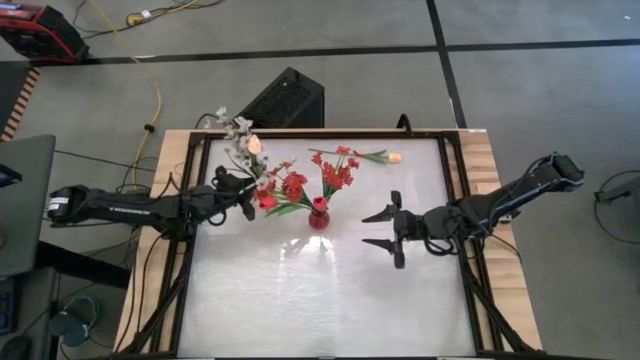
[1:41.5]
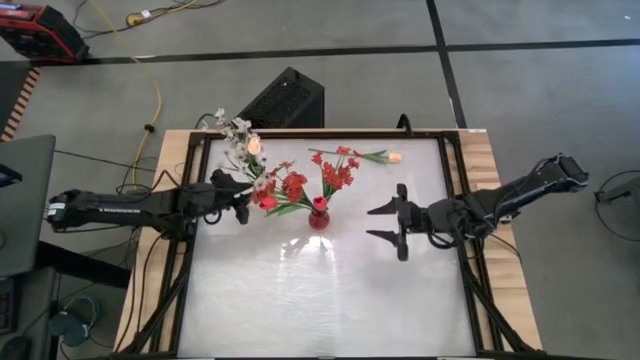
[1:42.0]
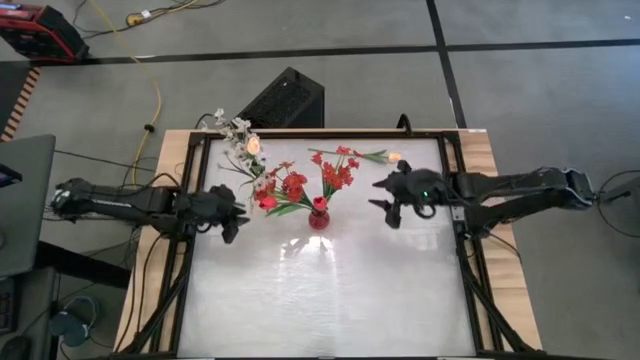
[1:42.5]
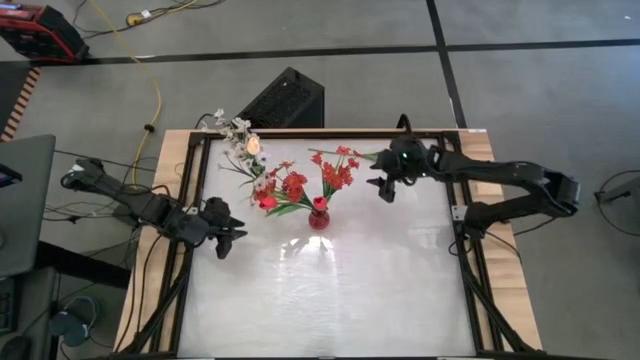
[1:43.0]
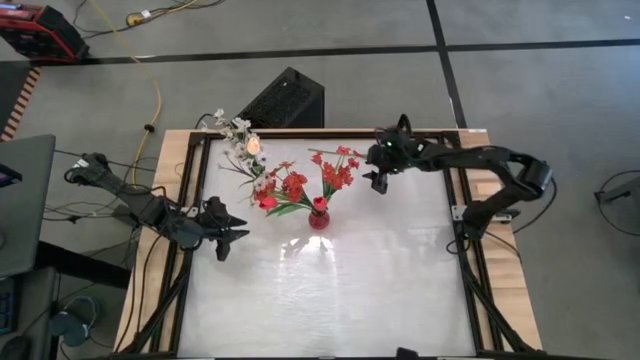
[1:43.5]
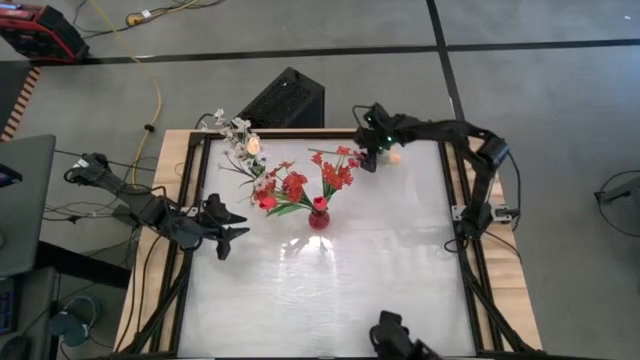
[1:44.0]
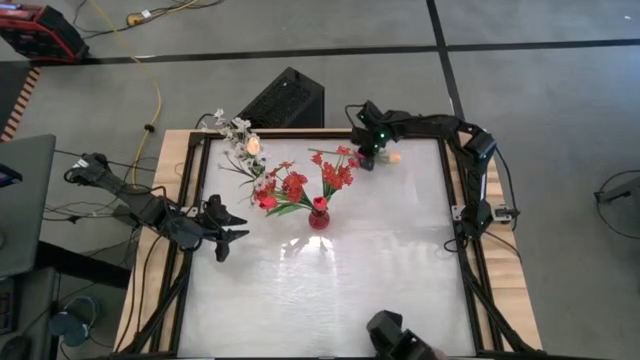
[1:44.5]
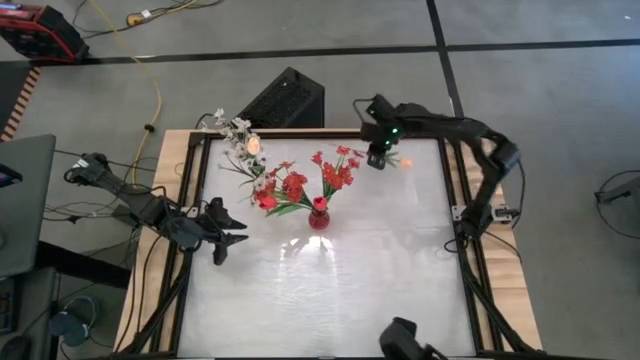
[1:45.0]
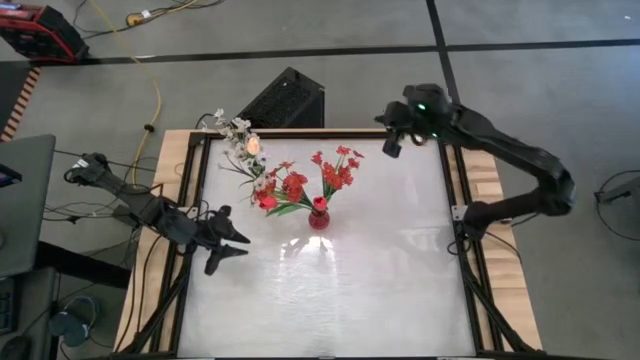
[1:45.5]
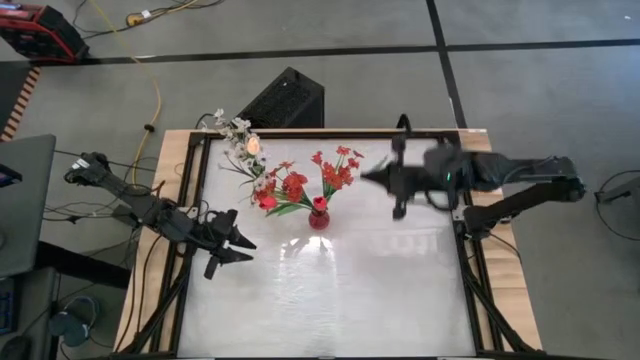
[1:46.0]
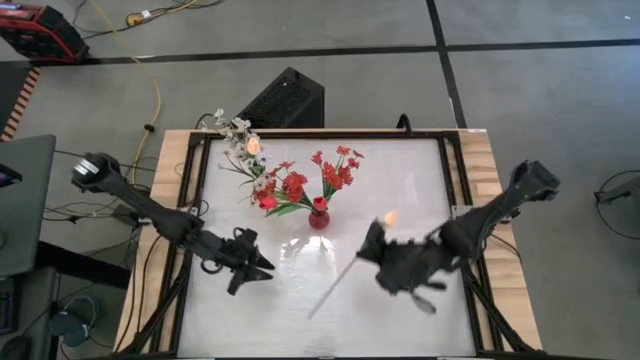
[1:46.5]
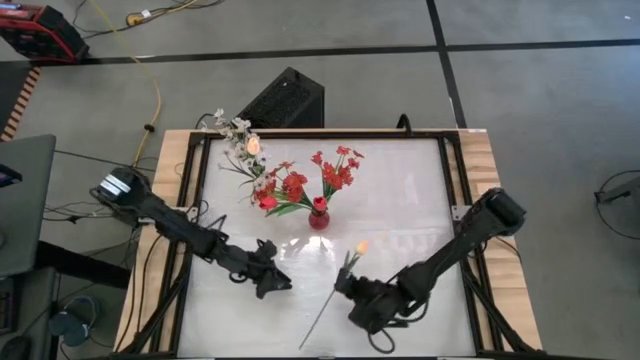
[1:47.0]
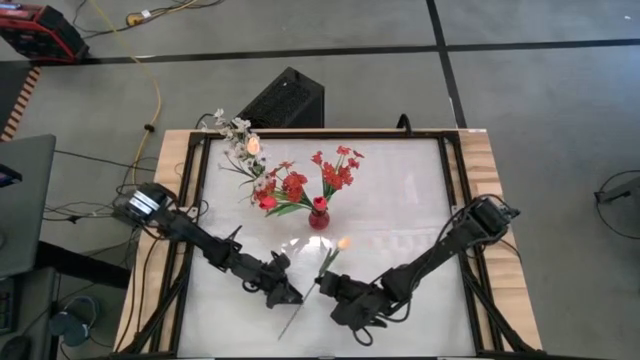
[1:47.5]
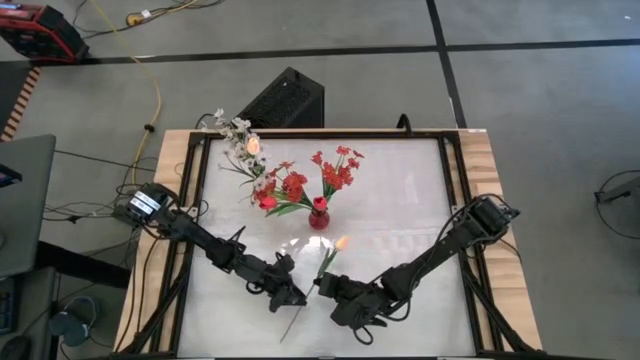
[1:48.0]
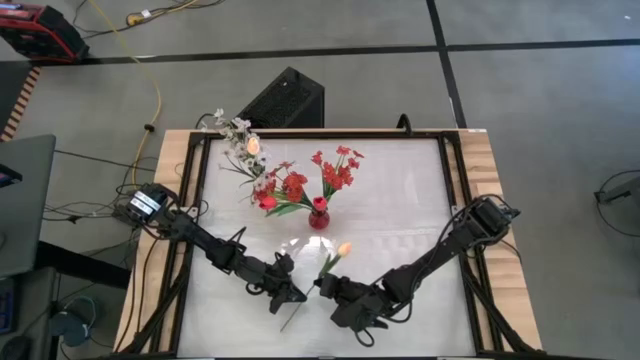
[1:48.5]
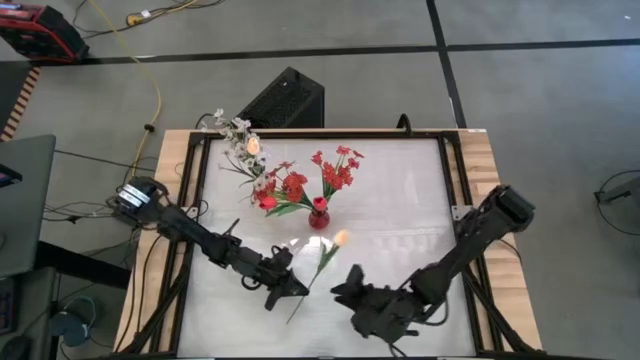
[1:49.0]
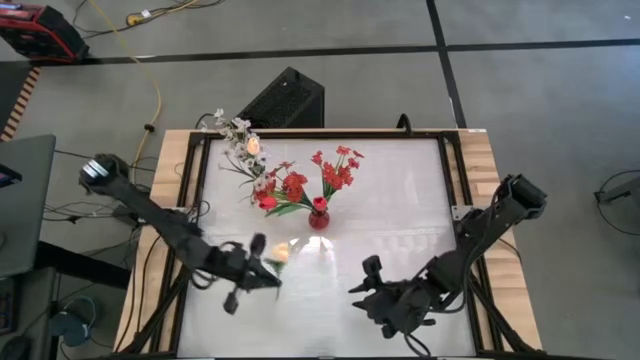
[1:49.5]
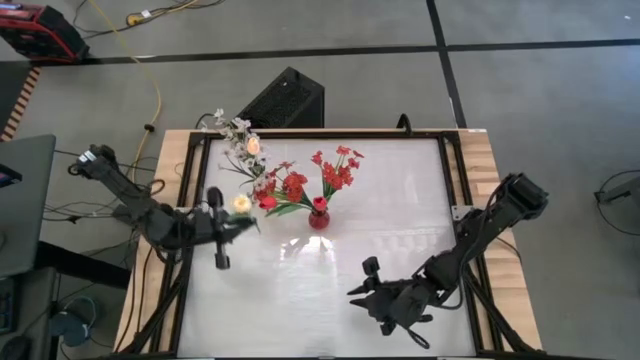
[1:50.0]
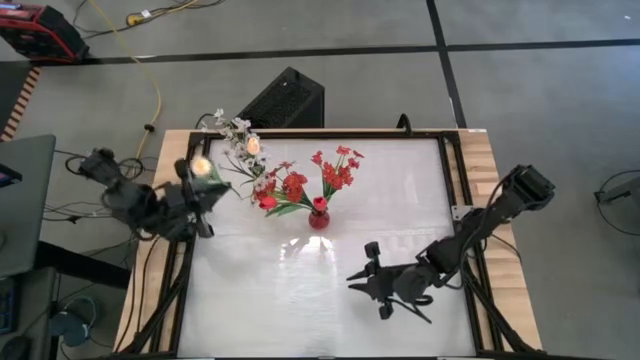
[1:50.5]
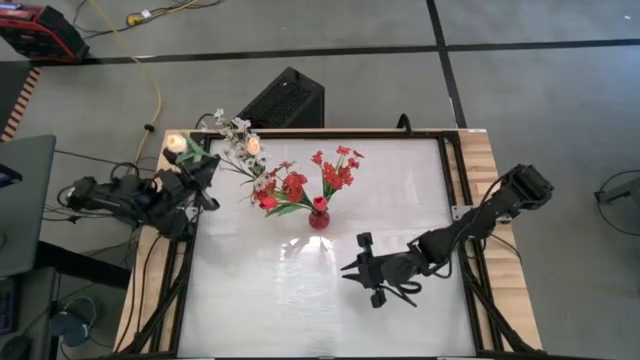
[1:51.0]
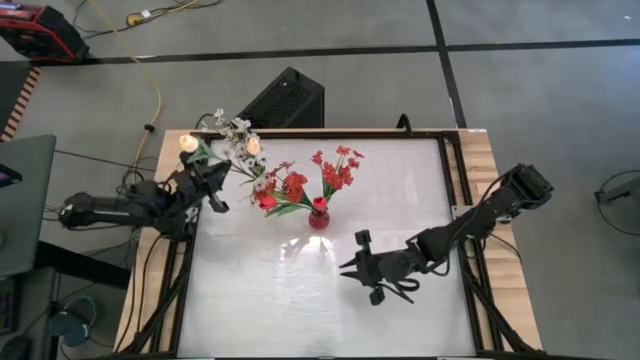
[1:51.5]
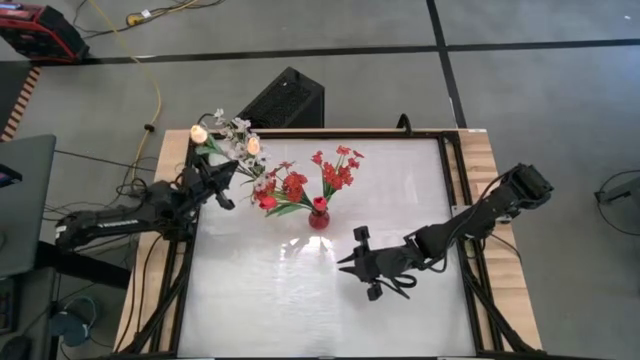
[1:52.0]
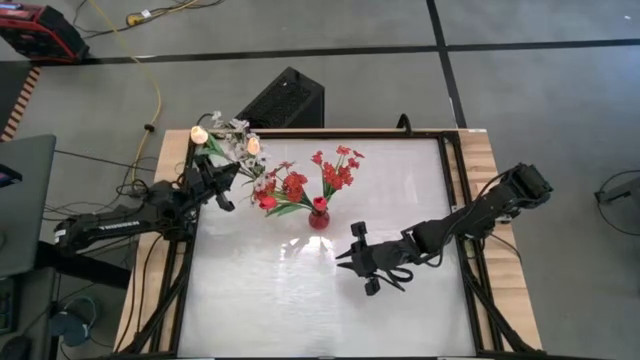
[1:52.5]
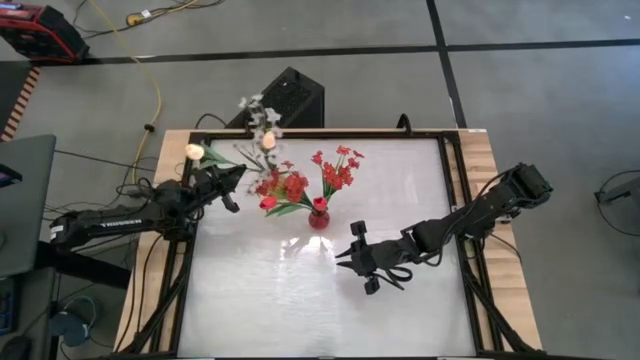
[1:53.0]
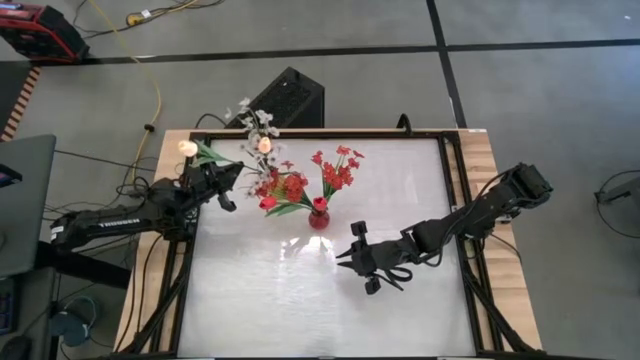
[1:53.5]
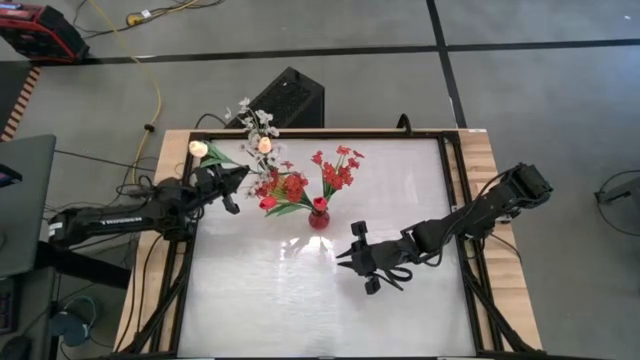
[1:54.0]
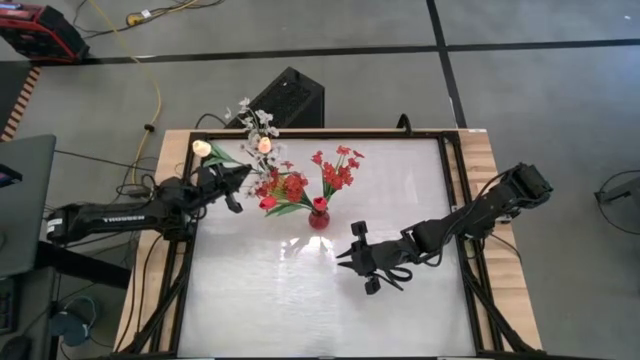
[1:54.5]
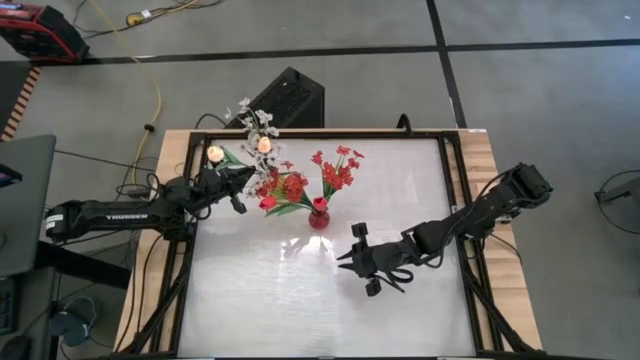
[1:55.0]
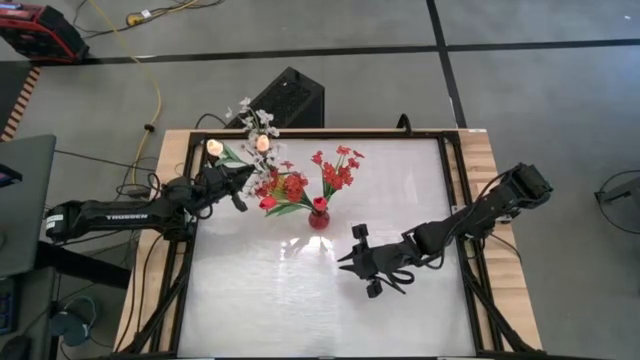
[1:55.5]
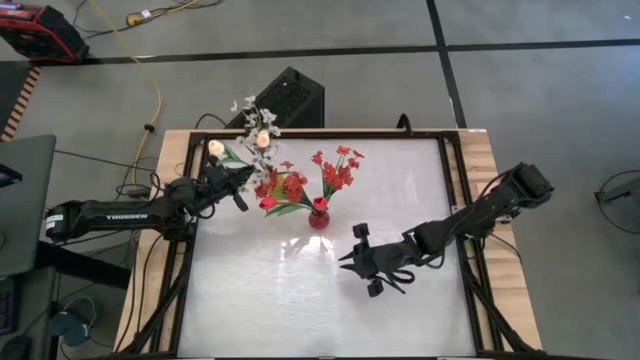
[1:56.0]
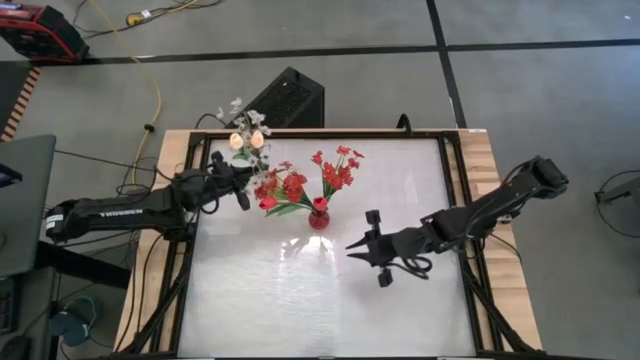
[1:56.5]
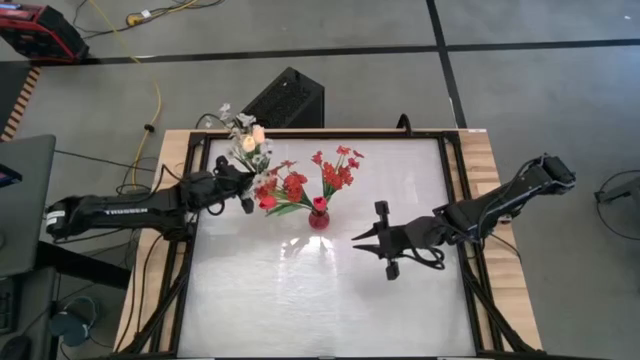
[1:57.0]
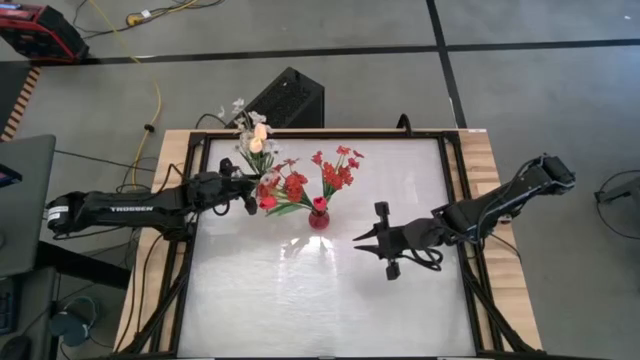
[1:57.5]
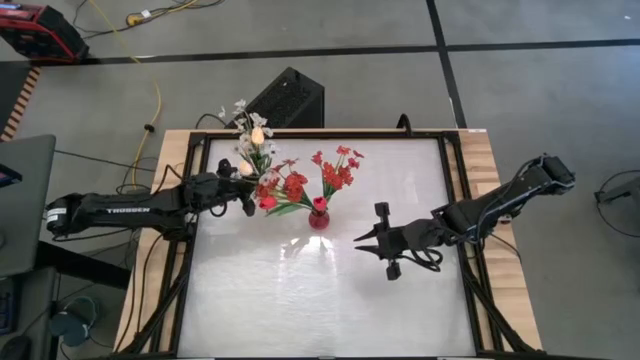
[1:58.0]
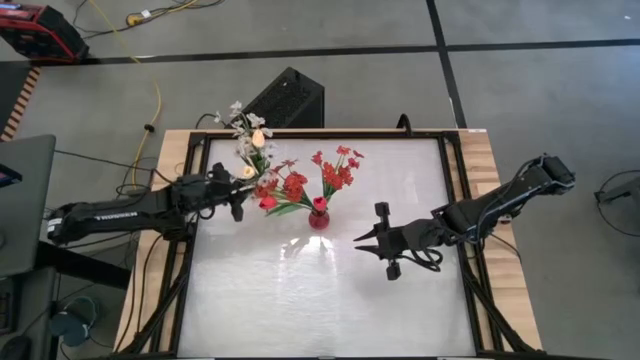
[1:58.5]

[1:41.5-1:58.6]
Task: Sort flowers into vase by color
Put the white tulip into the yellow vase
